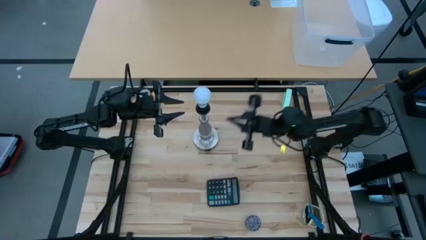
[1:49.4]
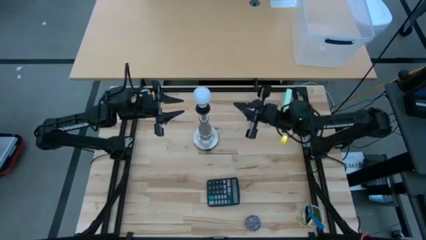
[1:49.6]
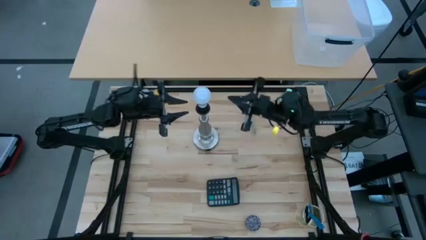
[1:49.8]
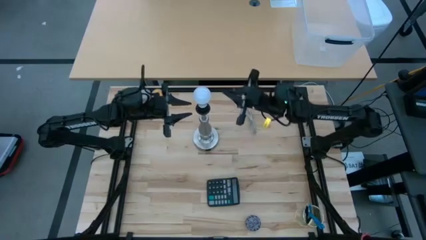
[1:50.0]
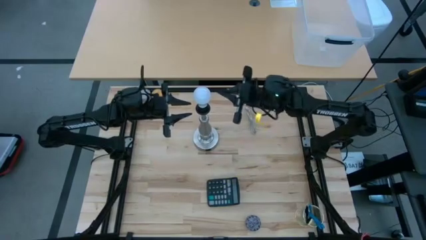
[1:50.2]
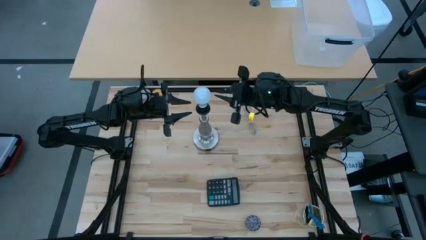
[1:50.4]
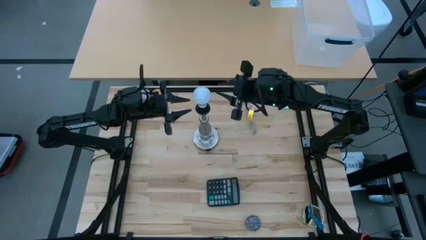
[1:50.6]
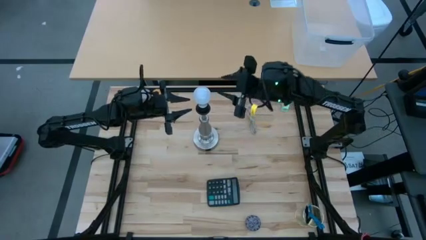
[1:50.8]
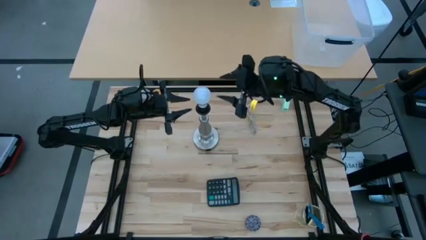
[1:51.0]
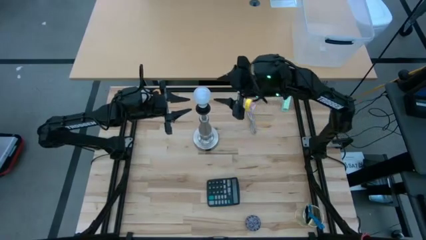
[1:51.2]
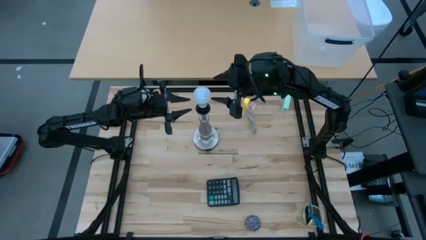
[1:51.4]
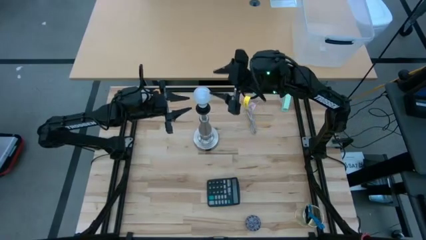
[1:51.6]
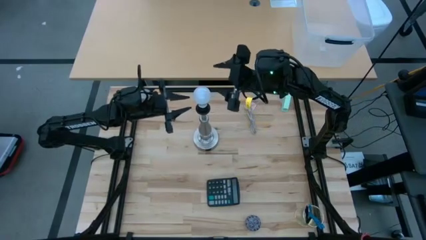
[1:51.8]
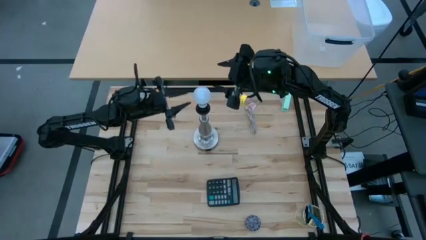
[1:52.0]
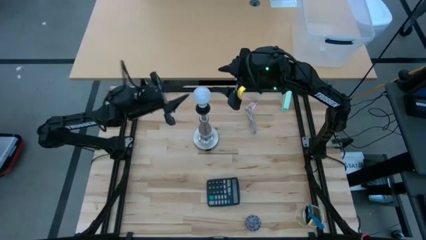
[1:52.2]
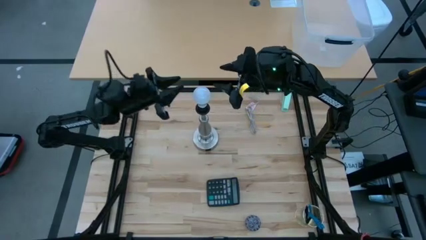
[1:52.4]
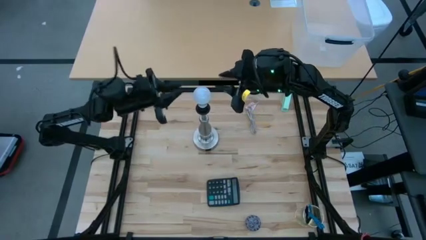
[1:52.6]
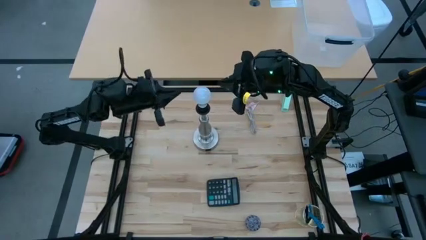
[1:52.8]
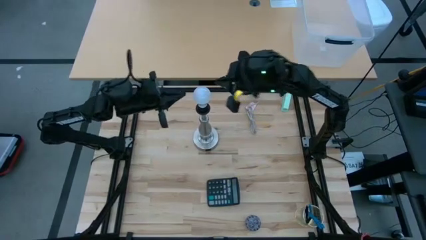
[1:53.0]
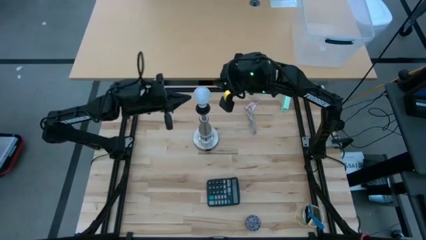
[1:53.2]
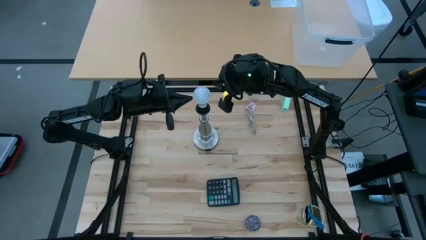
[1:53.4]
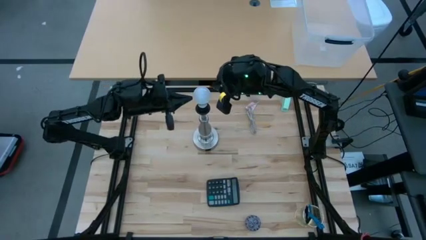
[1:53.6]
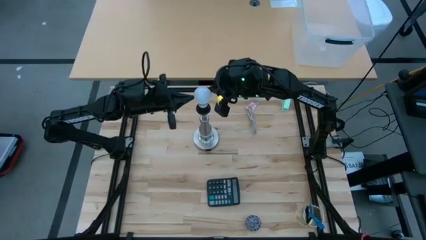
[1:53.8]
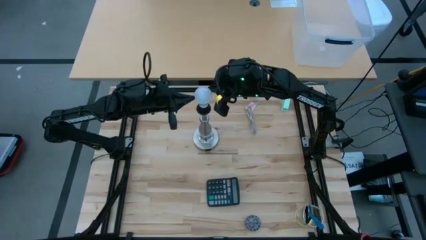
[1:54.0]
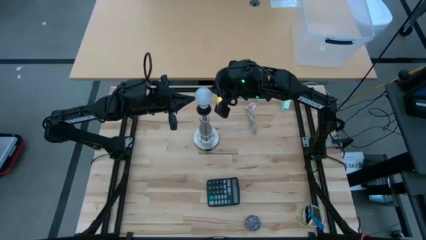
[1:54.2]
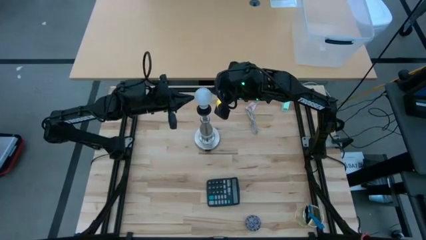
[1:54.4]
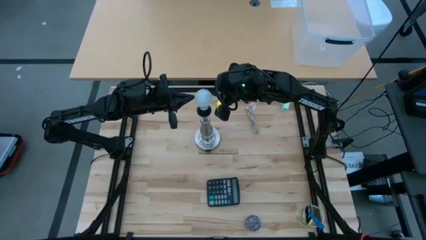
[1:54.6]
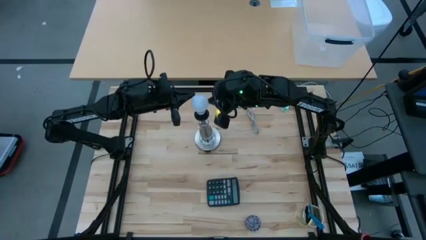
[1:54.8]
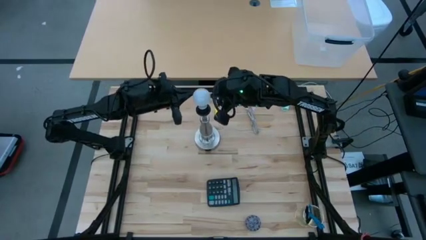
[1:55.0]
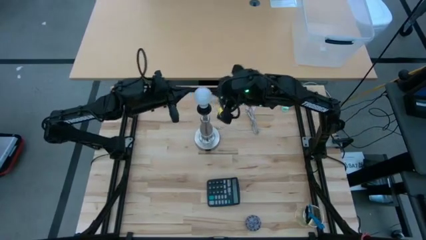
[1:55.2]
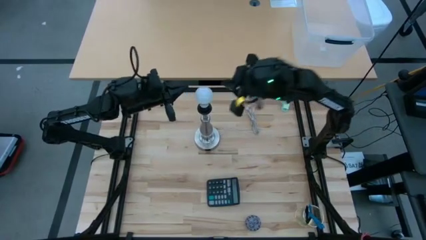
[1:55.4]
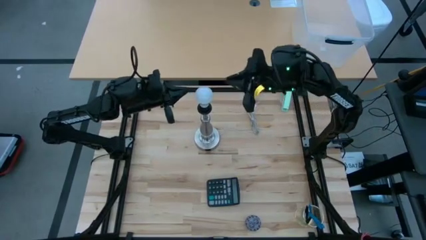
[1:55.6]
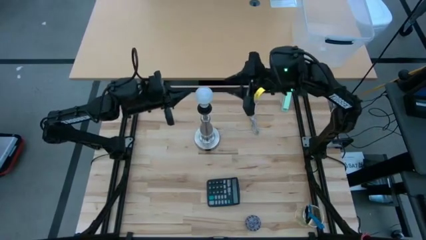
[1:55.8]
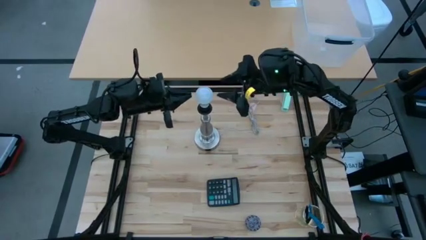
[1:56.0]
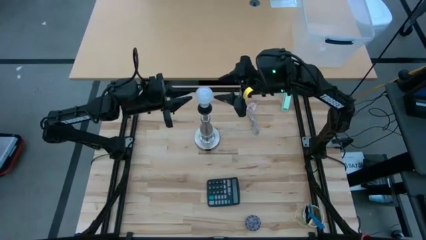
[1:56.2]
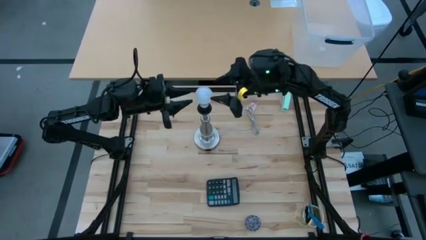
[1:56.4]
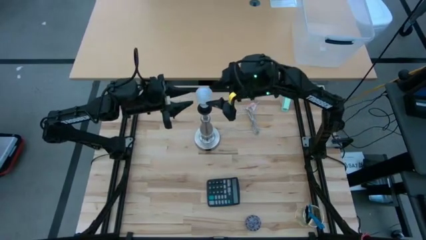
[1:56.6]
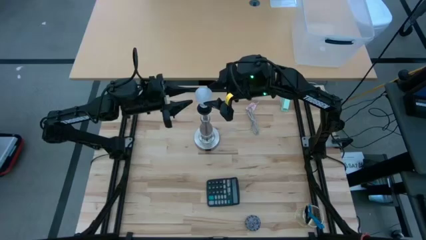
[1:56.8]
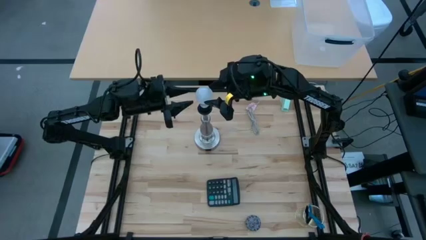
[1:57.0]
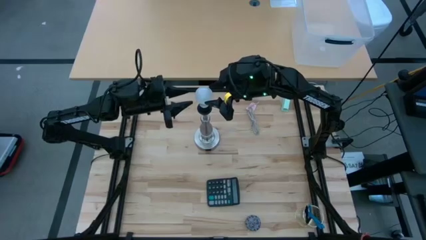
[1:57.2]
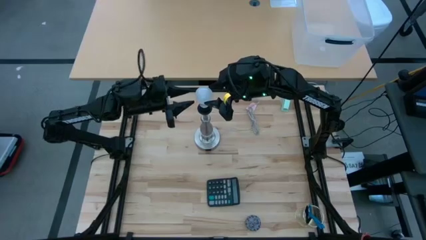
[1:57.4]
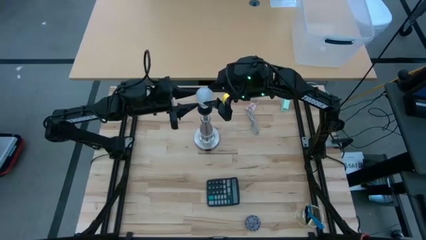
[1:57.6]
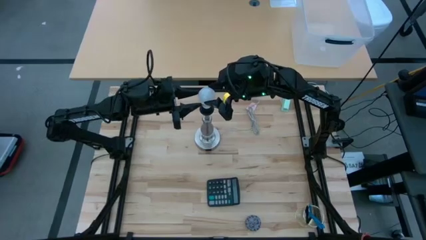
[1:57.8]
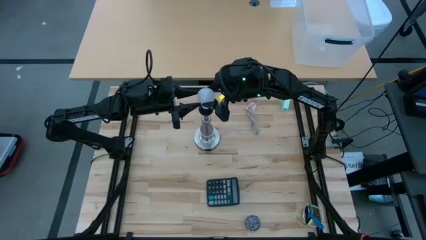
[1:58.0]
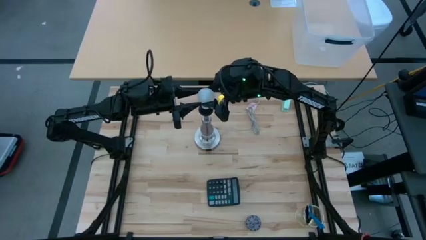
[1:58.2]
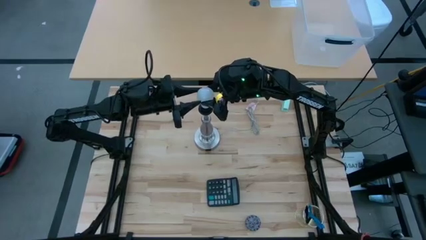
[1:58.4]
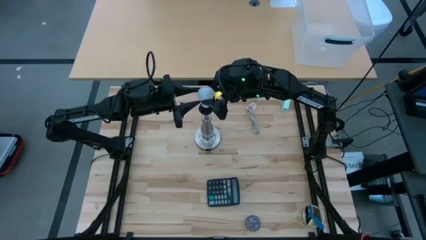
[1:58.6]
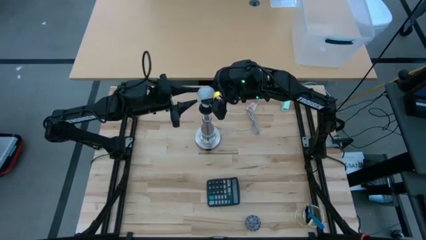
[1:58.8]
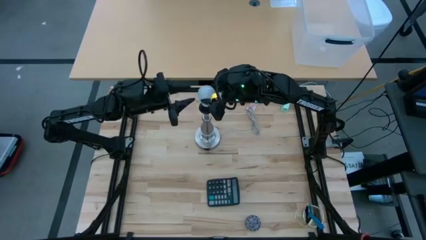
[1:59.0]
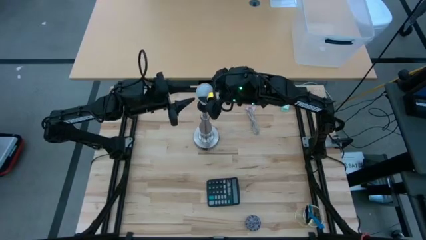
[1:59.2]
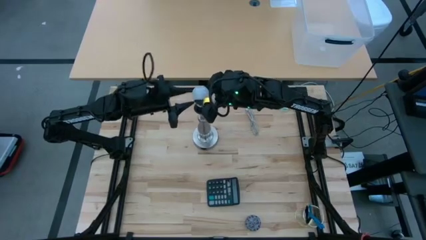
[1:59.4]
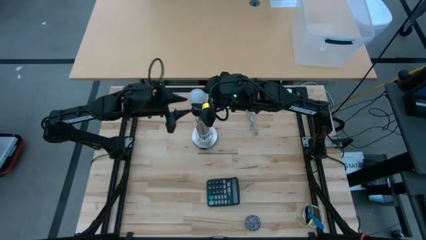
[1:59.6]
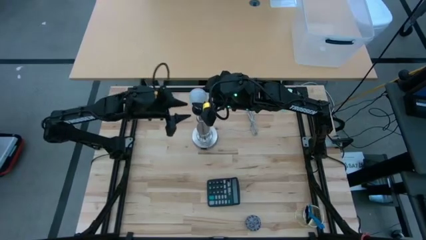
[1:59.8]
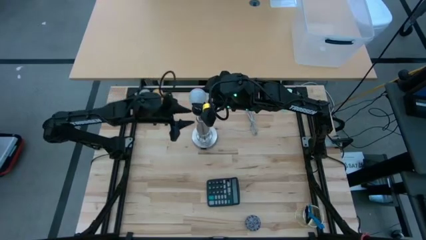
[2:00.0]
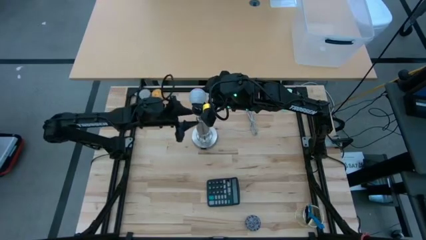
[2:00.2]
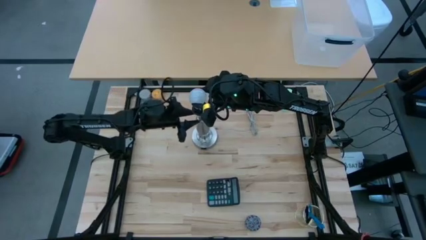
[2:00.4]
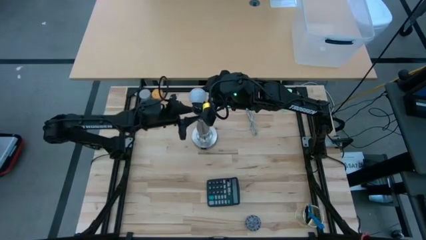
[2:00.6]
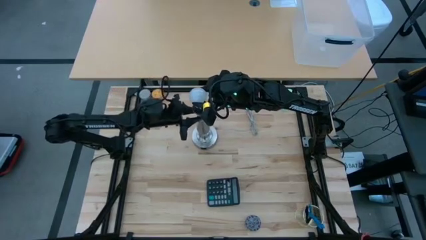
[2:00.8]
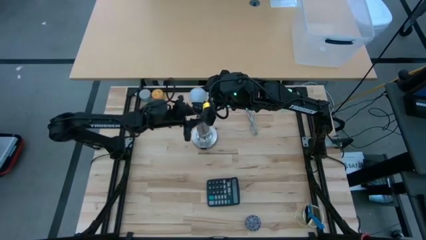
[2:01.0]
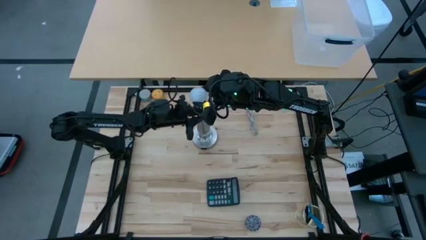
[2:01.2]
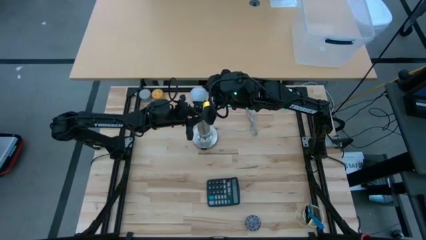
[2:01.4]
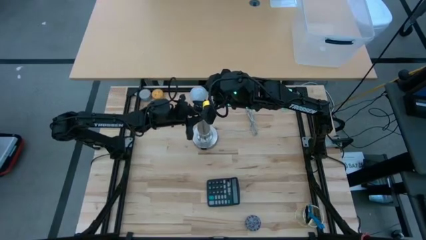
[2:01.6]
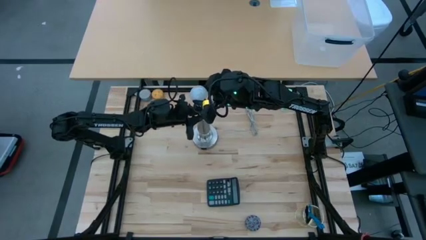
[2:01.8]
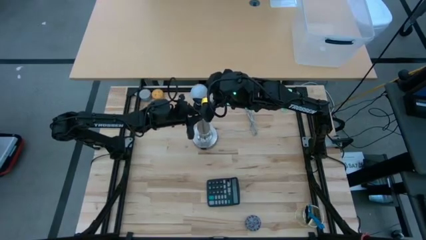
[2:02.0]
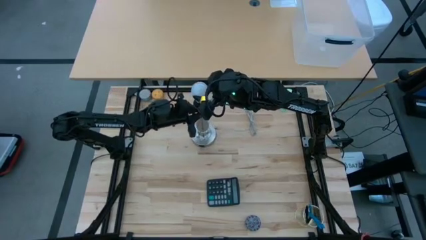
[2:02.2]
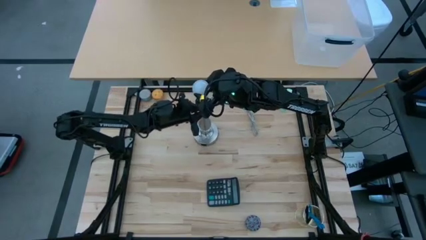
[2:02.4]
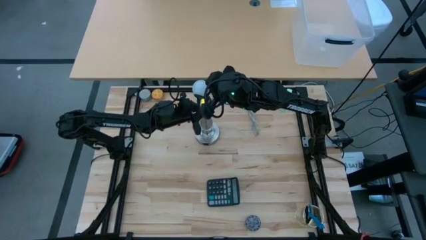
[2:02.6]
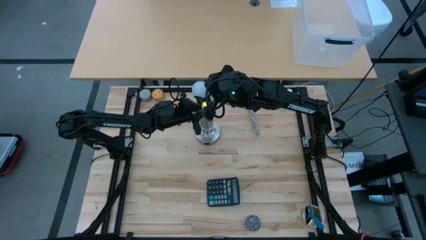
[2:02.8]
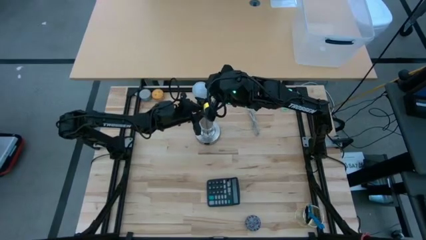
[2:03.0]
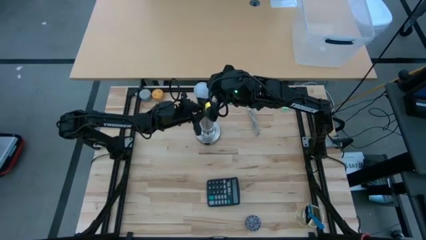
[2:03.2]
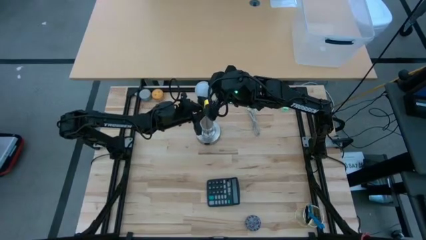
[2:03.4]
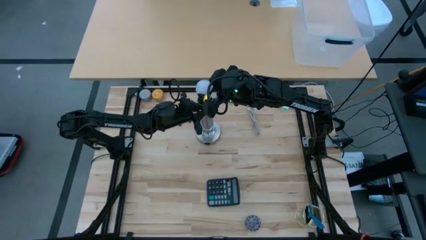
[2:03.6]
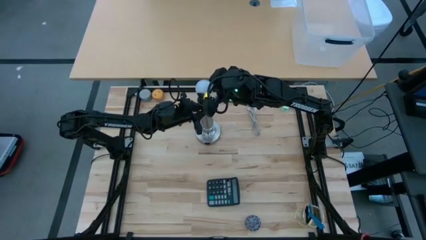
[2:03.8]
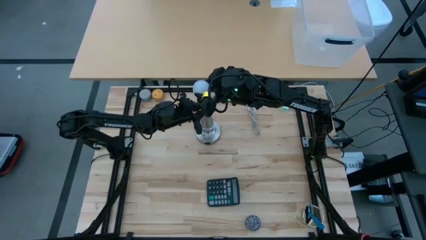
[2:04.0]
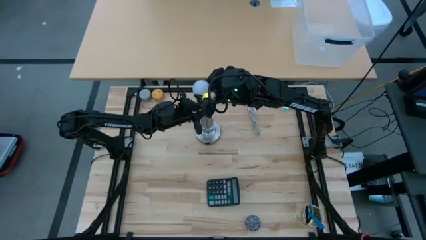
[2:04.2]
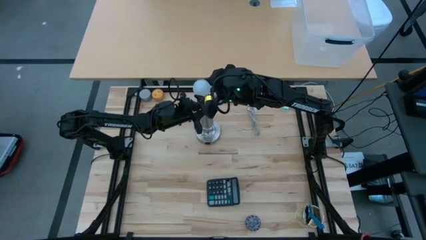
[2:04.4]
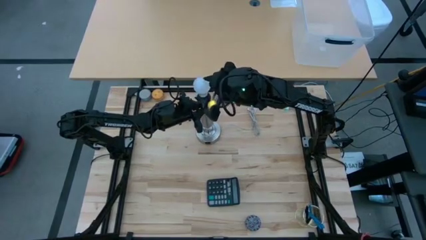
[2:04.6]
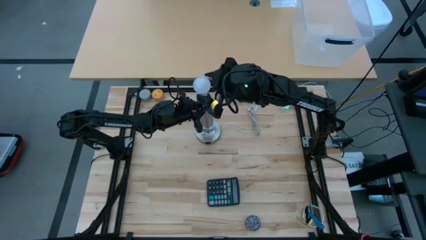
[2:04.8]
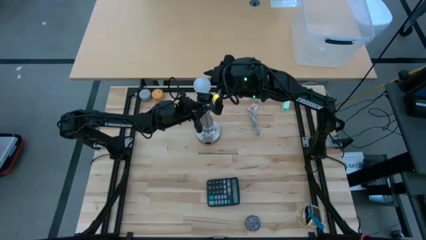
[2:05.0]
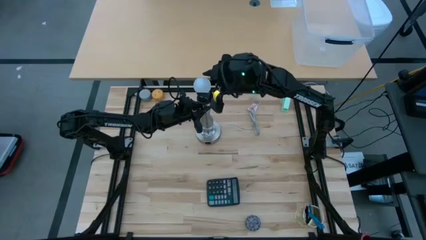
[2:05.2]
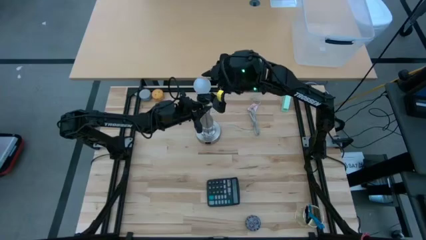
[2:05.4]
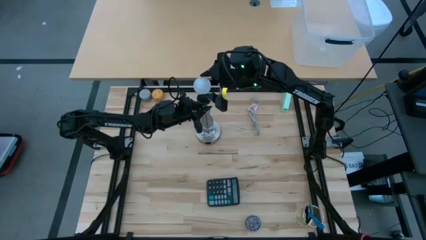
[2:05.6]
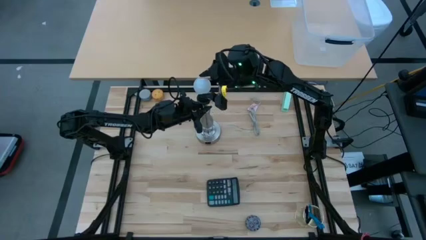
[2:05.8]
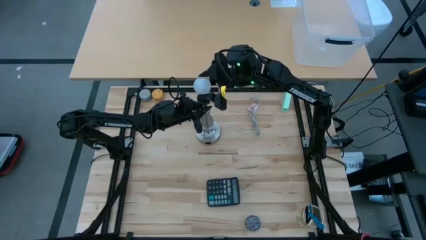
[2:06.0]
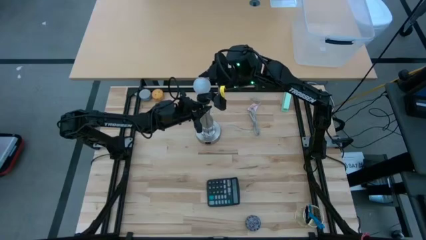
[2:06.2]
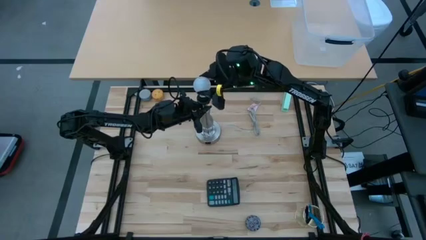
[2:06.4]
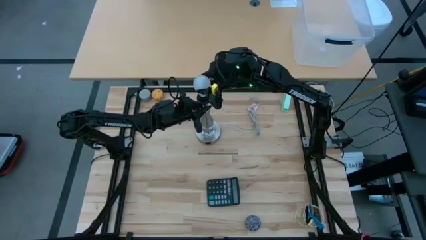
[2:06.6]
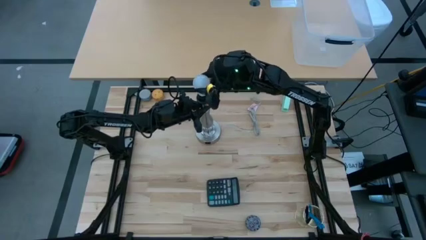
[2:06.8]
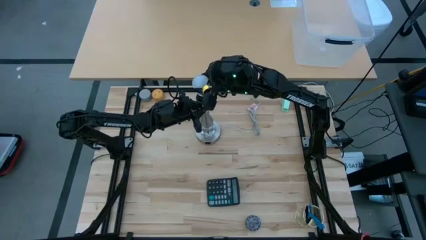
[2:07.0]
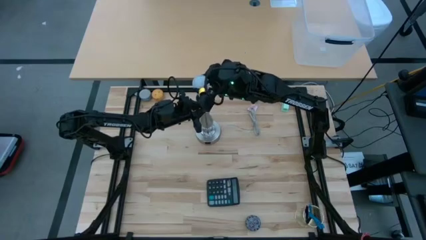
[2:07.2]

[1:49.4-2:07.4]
Task: Screw lightbulb
Insert the light bulb into the lamp
